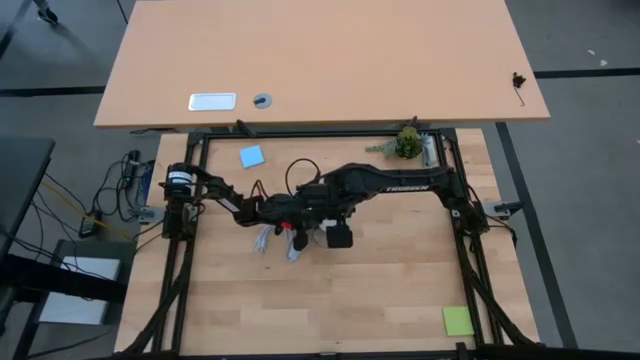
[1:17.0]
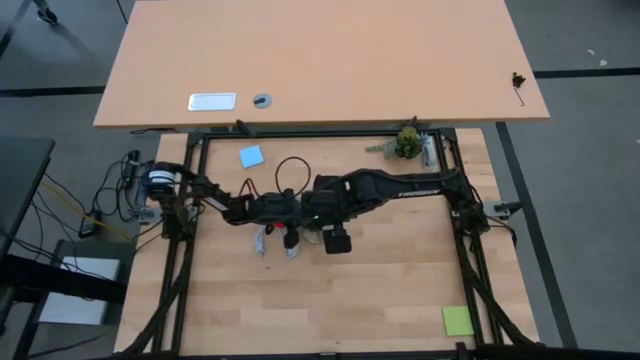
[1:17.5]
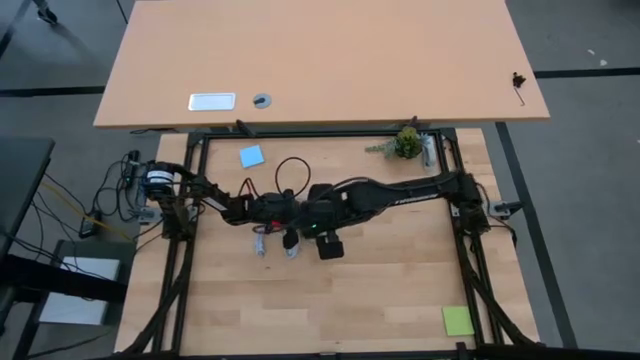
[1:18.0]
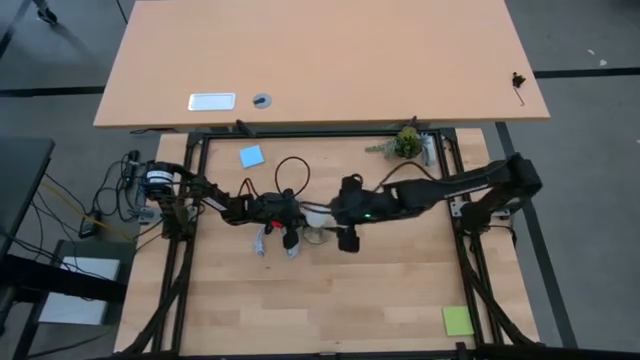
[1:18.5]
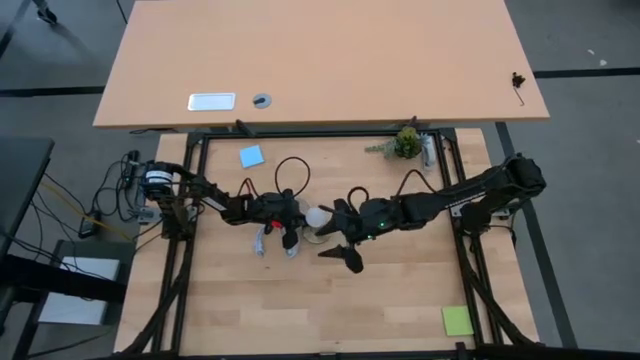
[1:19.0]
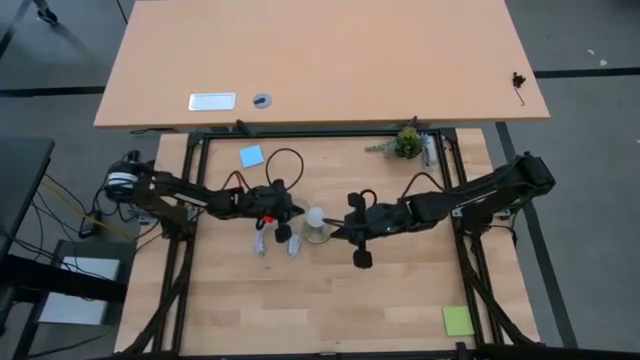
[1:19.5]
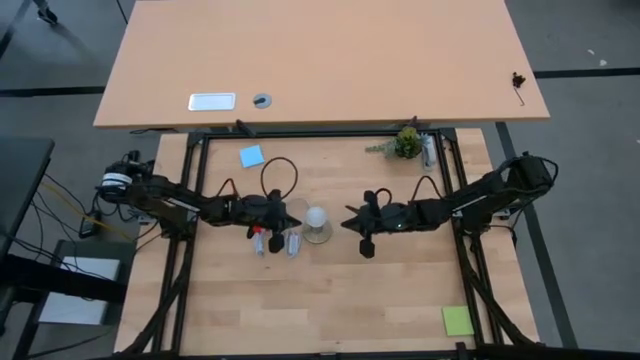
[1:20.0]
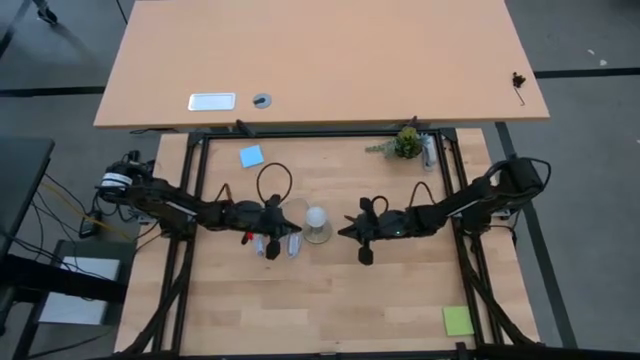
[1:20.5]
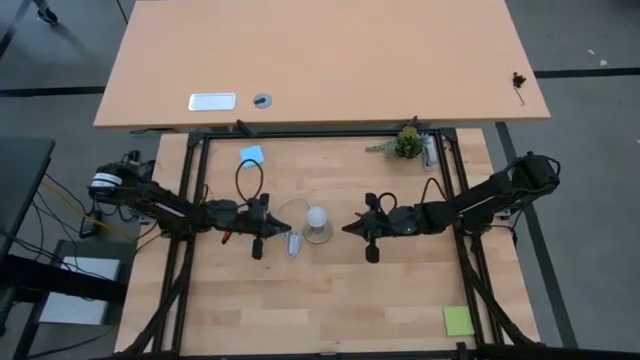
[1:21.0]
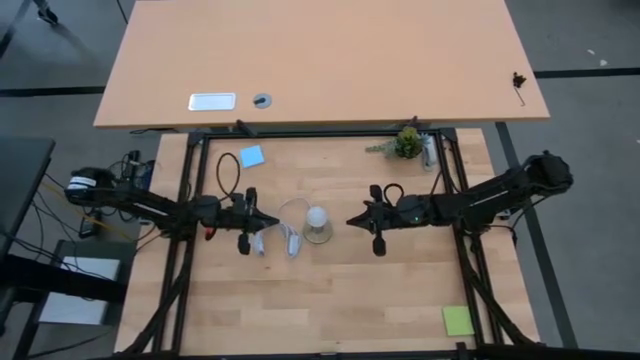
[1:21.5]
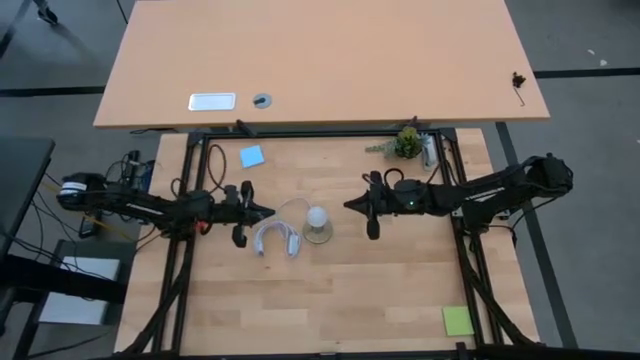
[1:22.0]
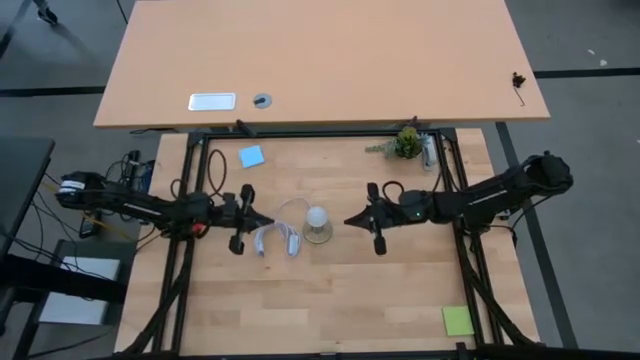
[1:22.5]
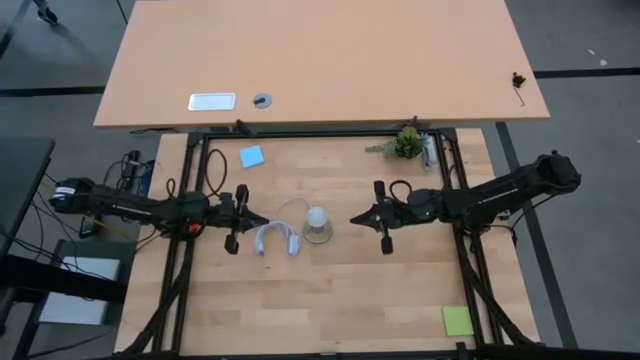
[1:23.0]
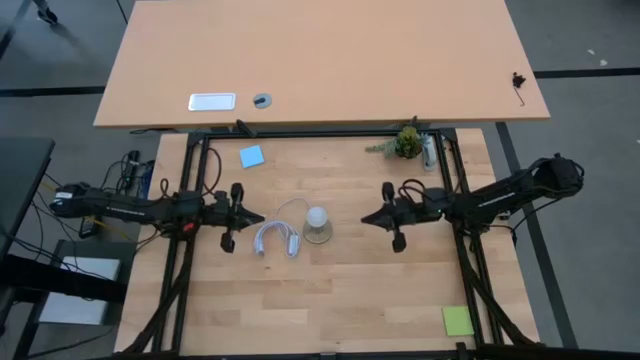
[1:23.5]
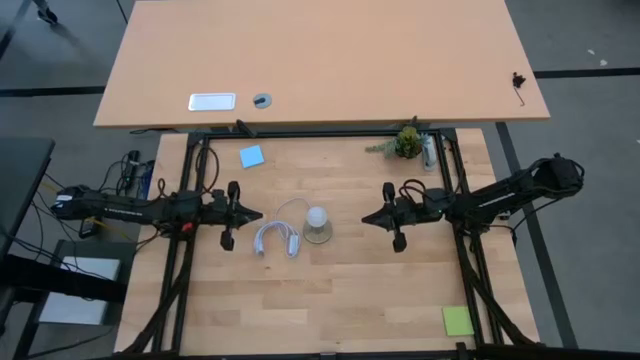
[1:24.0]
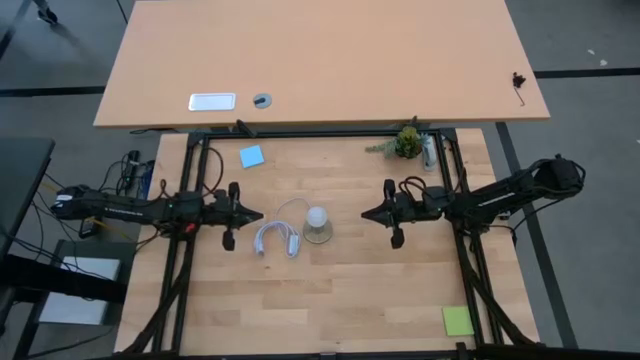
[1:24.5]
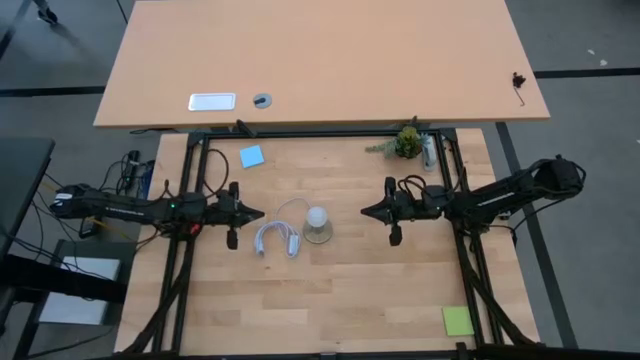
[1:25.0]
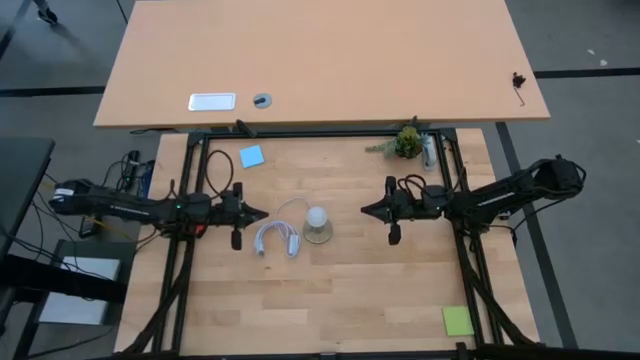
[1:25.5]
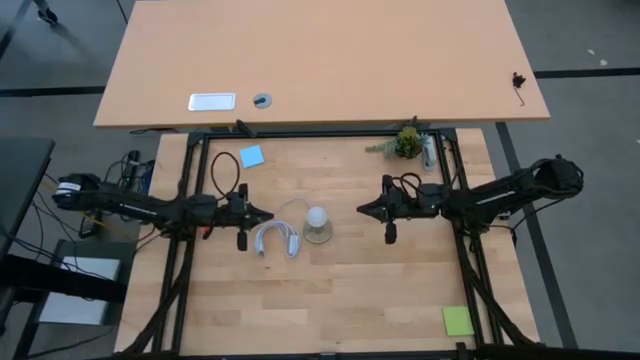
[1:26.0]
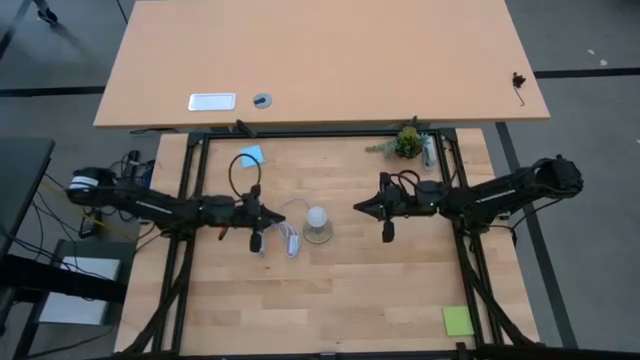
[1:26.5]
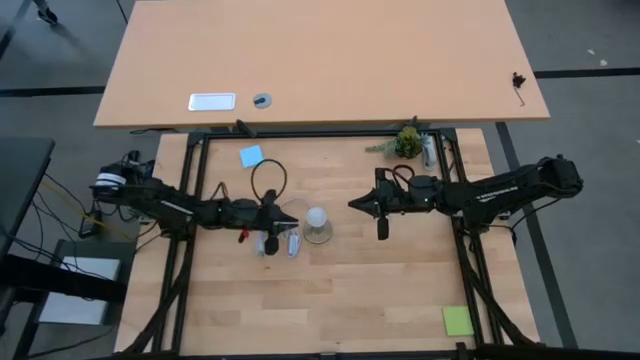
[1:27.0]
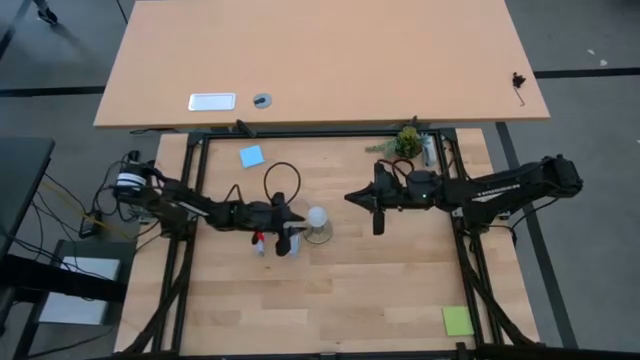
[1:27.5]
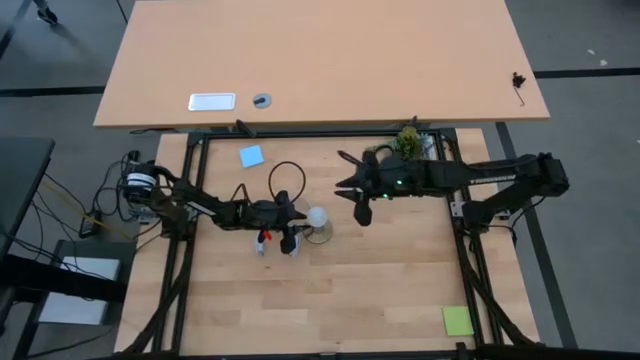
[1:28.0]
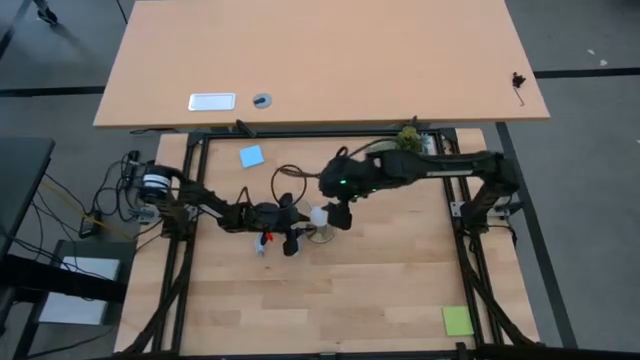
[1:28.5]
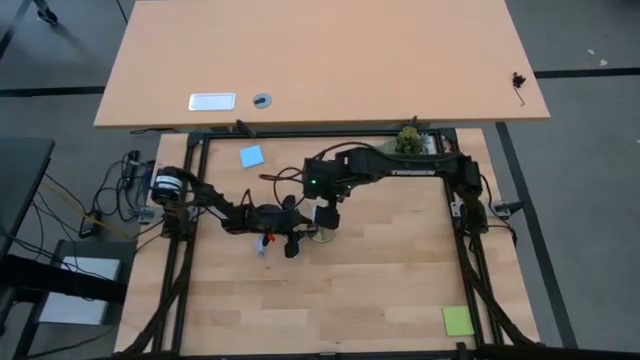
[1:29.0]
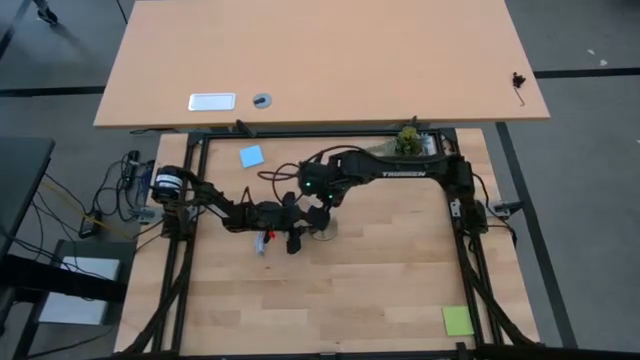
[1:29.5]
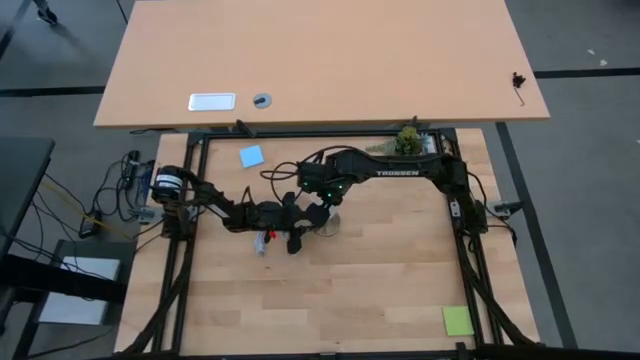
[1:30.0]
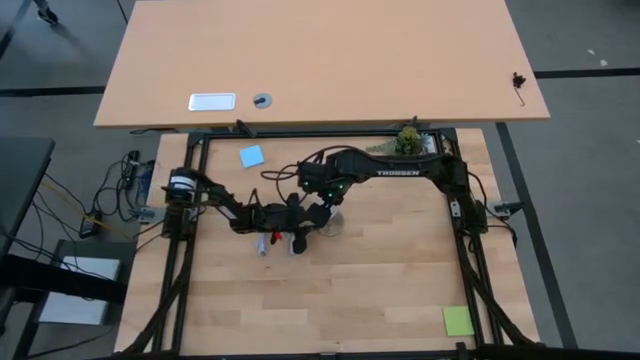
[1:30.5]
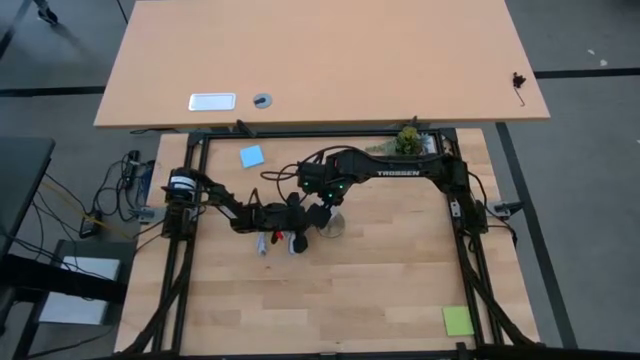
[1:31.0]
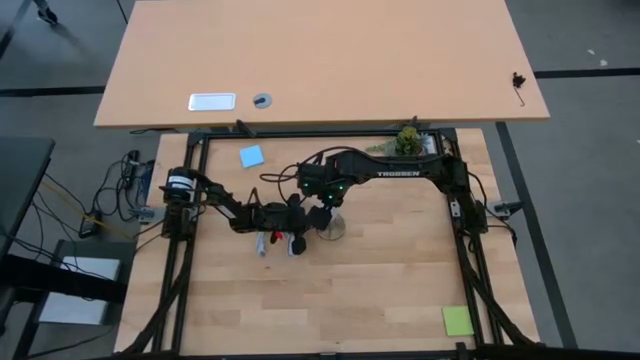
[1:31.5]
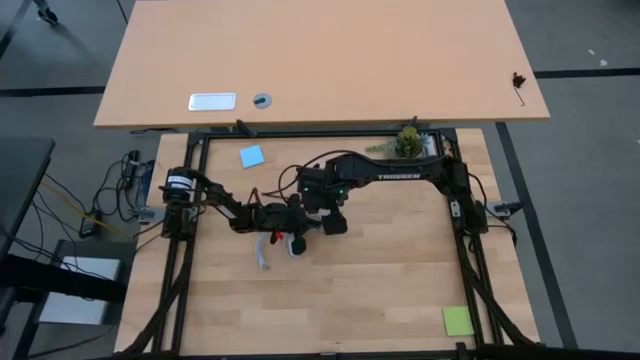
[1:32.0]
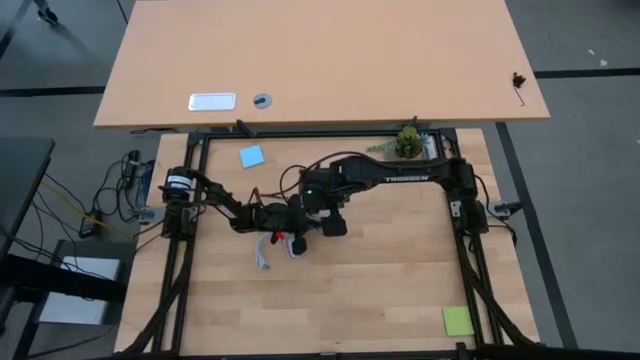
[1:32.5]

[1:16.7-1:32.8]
Task: Screw lightbulb
Remove the light bulb from the lamp
